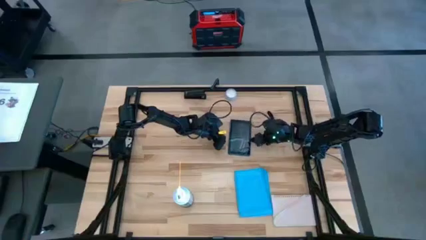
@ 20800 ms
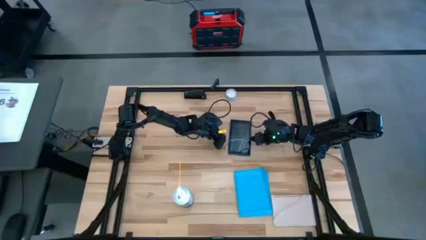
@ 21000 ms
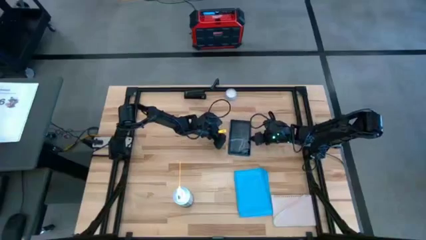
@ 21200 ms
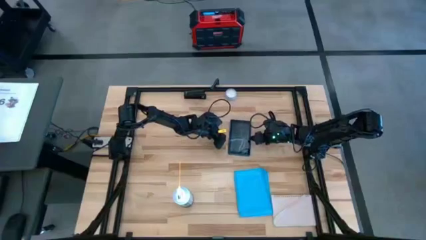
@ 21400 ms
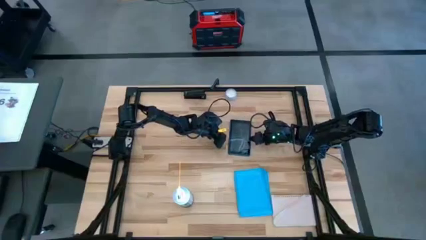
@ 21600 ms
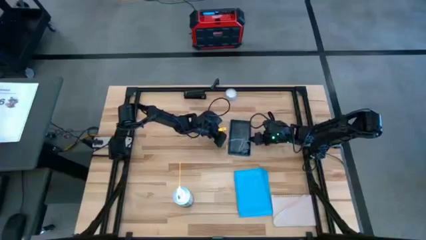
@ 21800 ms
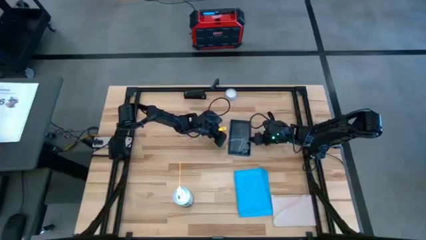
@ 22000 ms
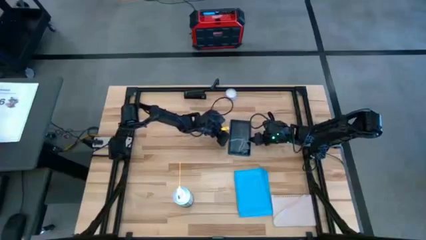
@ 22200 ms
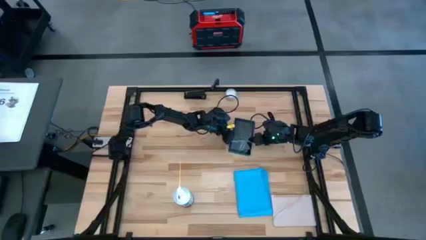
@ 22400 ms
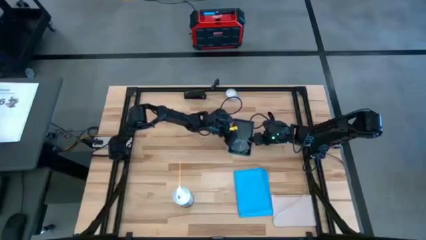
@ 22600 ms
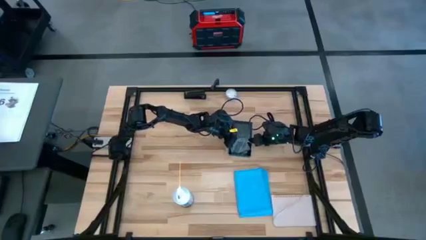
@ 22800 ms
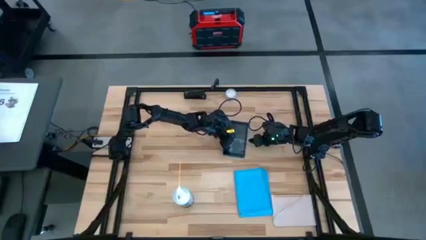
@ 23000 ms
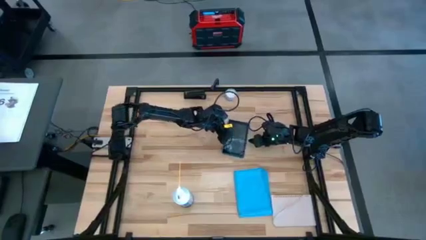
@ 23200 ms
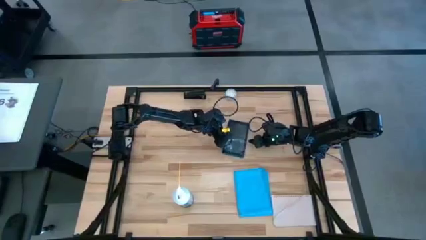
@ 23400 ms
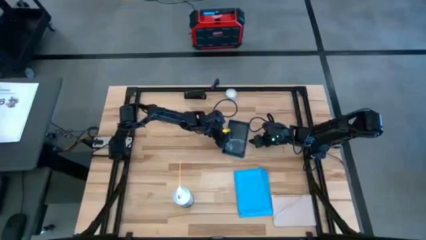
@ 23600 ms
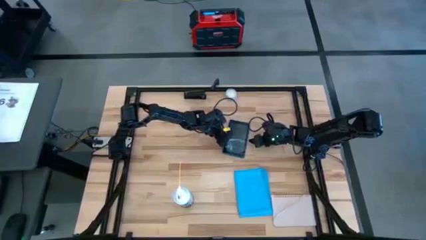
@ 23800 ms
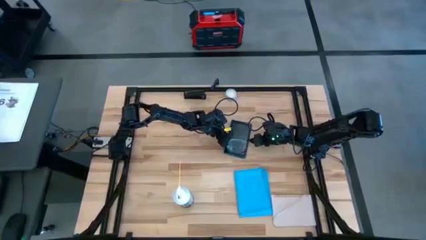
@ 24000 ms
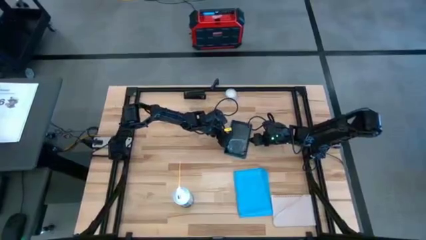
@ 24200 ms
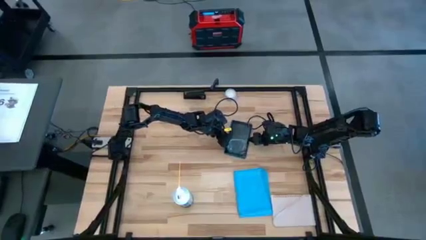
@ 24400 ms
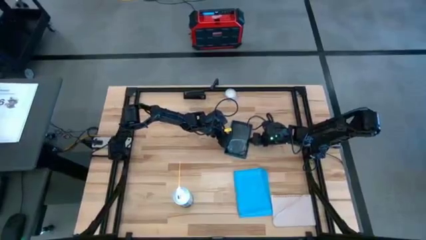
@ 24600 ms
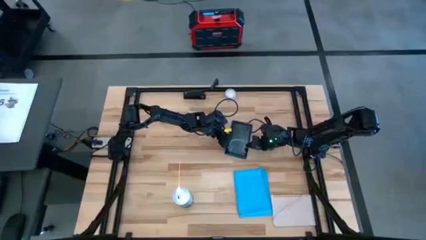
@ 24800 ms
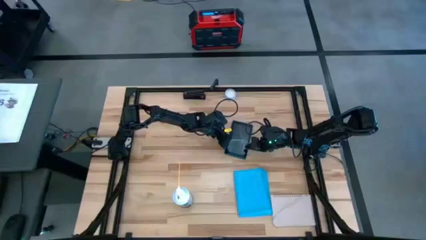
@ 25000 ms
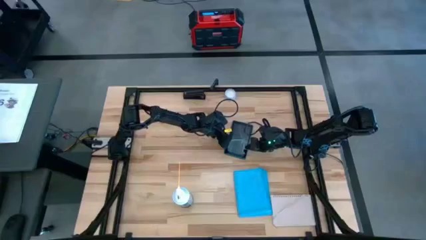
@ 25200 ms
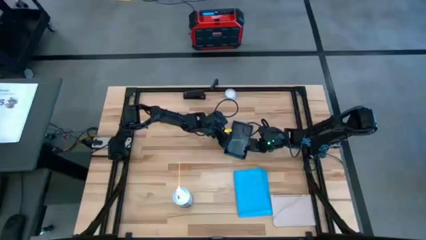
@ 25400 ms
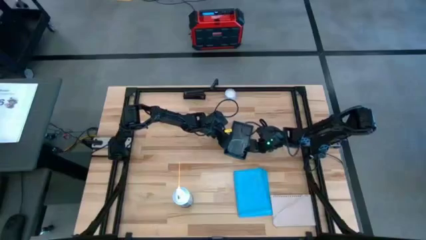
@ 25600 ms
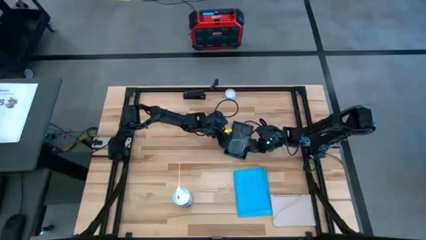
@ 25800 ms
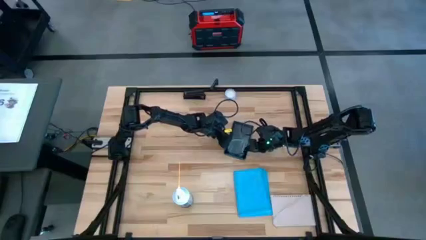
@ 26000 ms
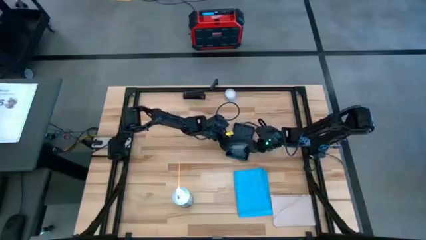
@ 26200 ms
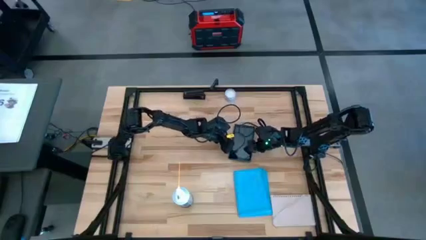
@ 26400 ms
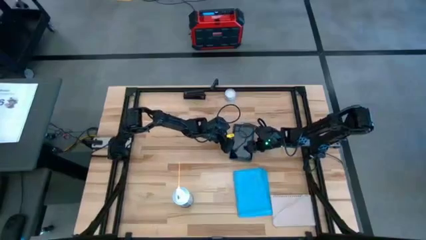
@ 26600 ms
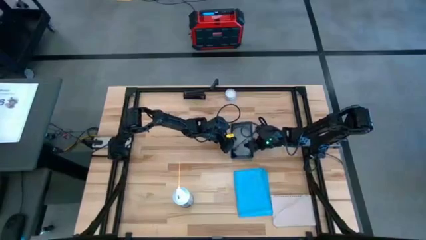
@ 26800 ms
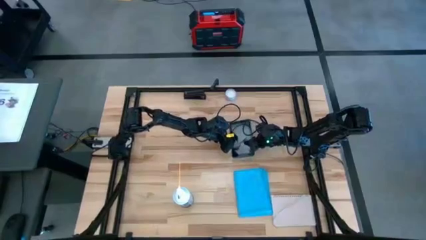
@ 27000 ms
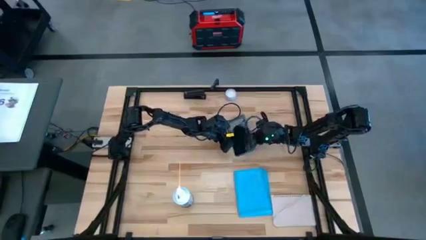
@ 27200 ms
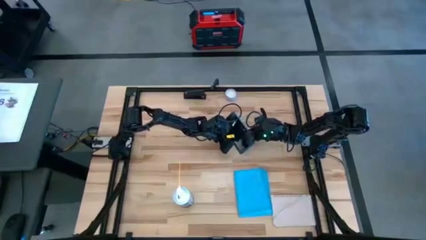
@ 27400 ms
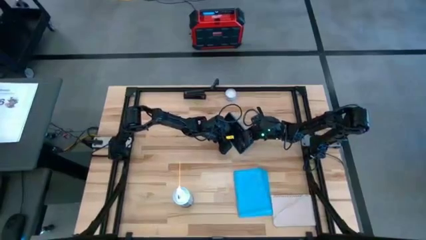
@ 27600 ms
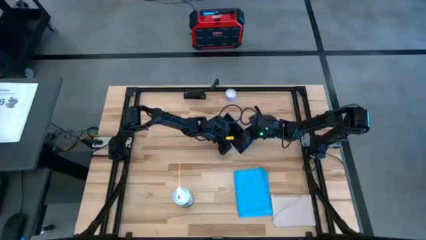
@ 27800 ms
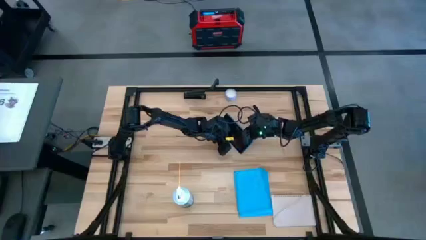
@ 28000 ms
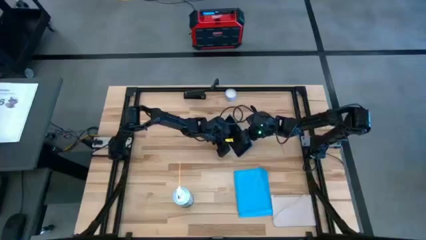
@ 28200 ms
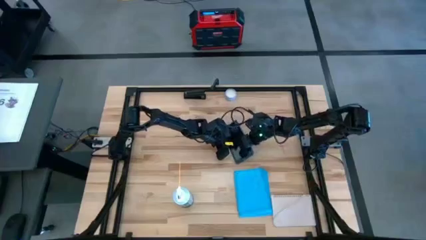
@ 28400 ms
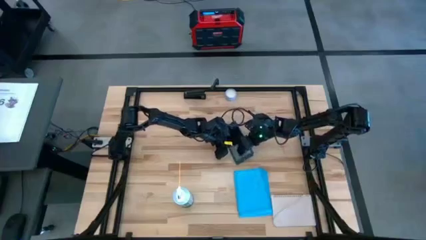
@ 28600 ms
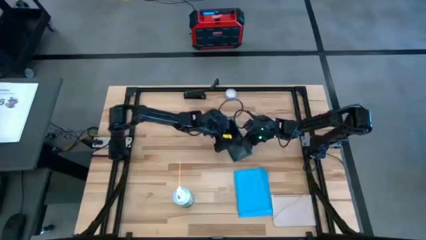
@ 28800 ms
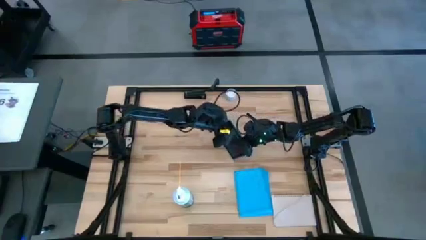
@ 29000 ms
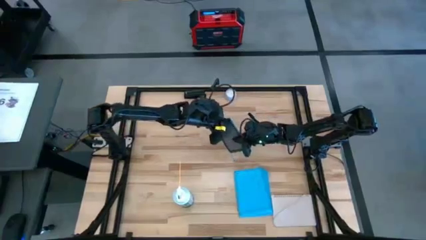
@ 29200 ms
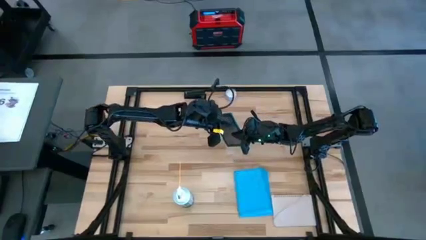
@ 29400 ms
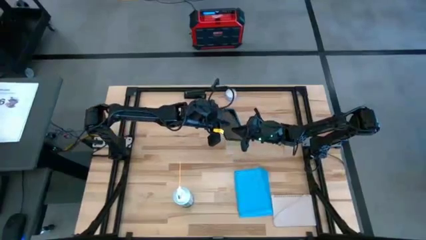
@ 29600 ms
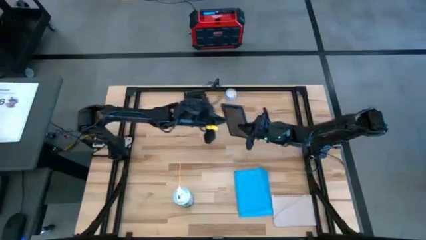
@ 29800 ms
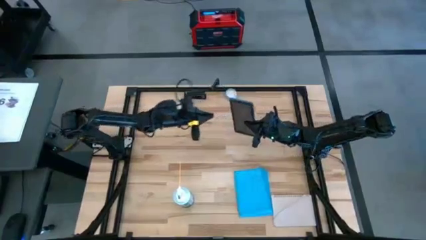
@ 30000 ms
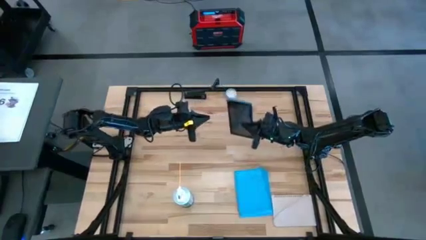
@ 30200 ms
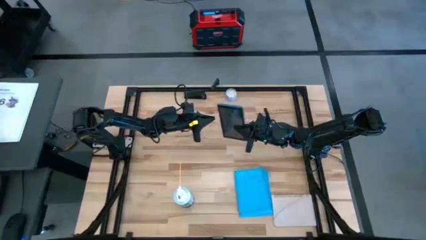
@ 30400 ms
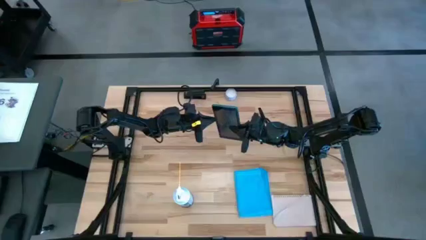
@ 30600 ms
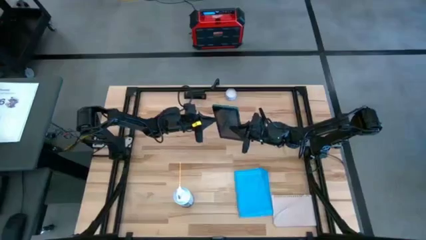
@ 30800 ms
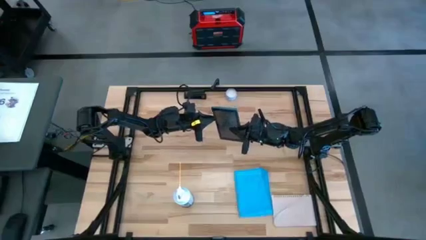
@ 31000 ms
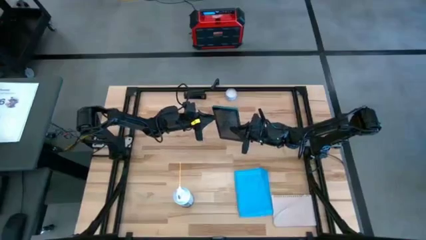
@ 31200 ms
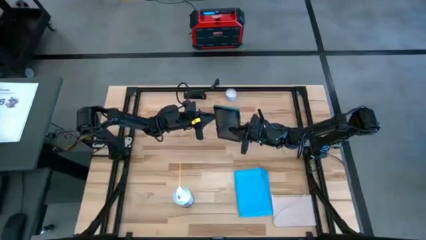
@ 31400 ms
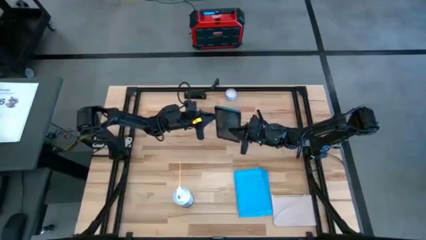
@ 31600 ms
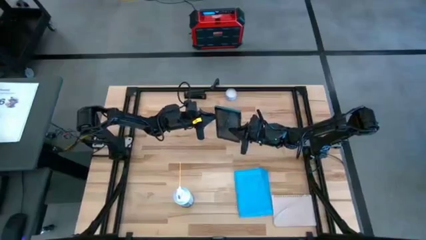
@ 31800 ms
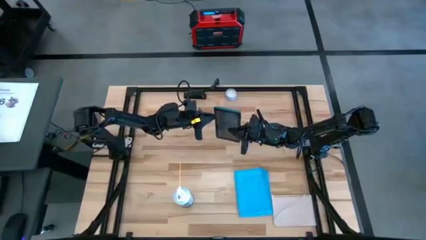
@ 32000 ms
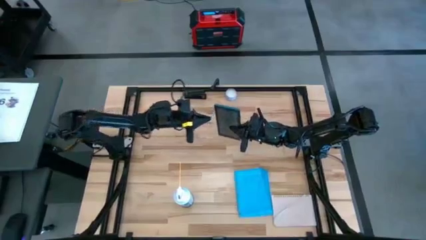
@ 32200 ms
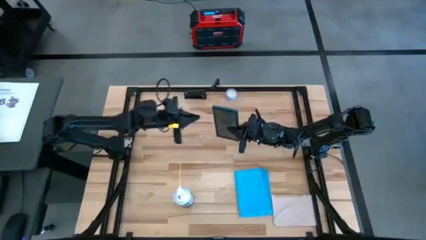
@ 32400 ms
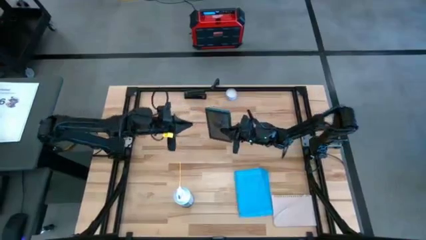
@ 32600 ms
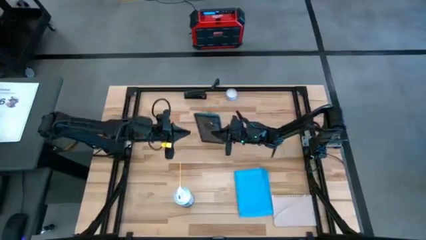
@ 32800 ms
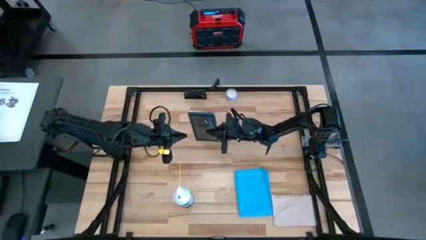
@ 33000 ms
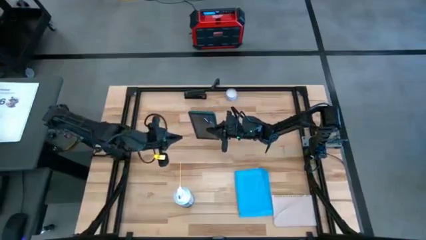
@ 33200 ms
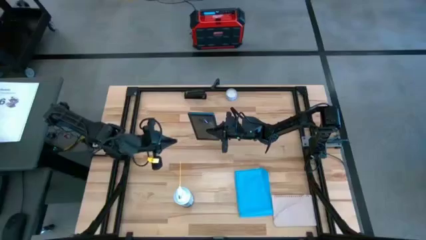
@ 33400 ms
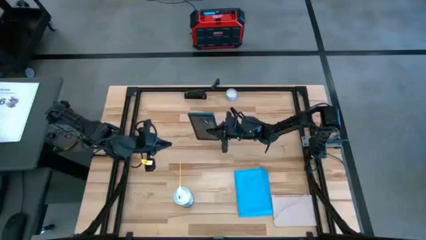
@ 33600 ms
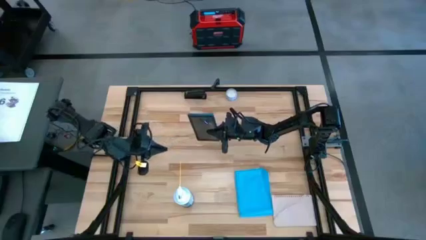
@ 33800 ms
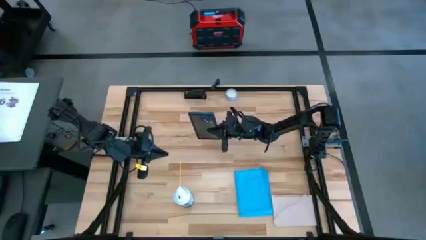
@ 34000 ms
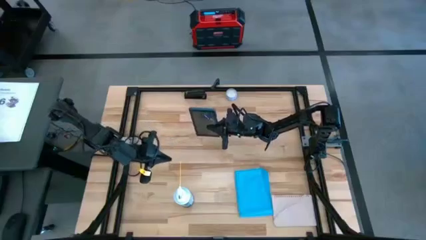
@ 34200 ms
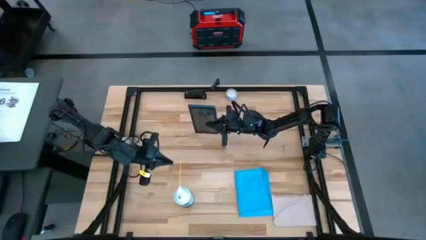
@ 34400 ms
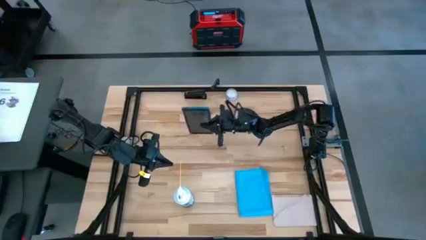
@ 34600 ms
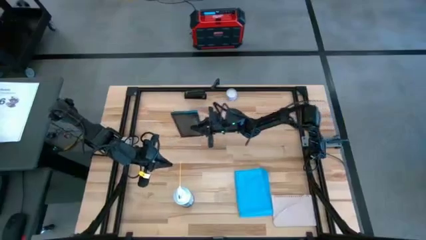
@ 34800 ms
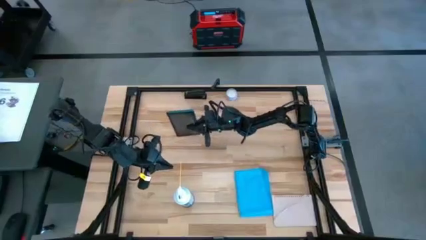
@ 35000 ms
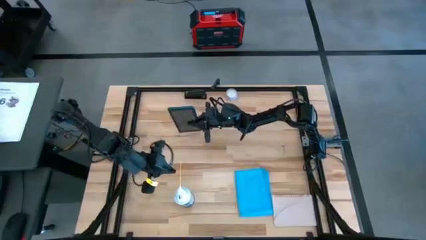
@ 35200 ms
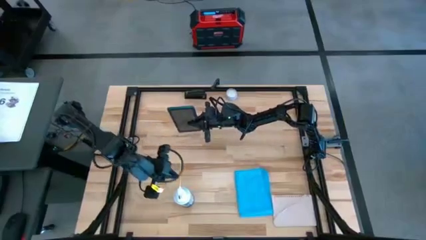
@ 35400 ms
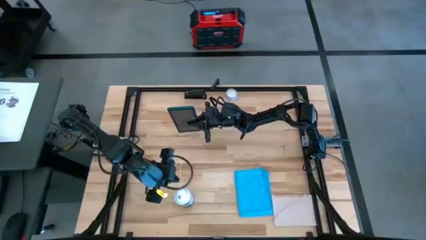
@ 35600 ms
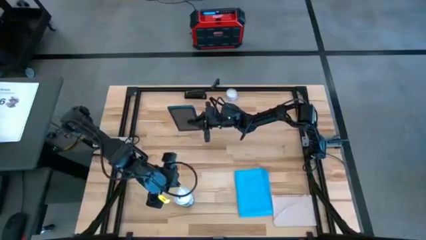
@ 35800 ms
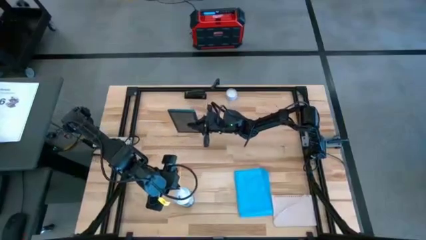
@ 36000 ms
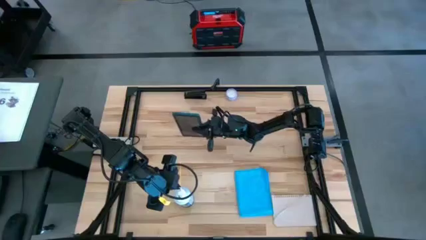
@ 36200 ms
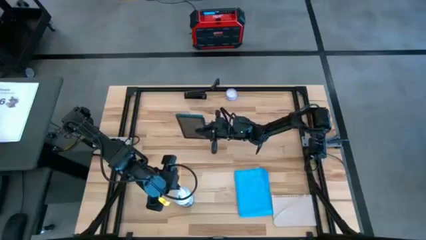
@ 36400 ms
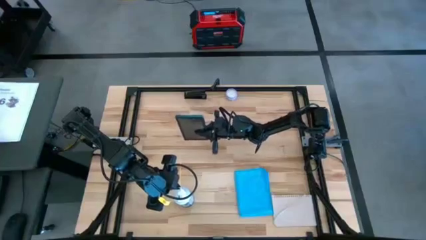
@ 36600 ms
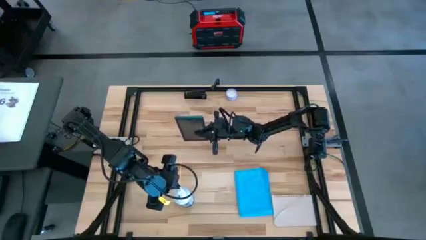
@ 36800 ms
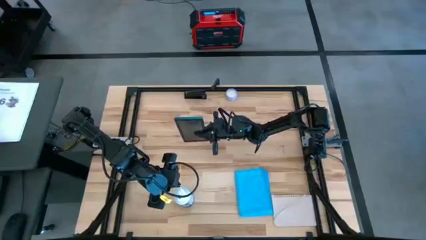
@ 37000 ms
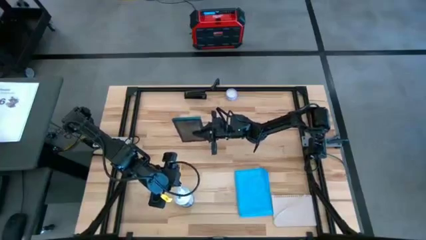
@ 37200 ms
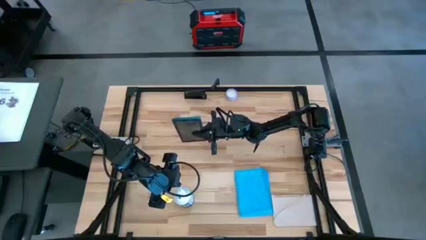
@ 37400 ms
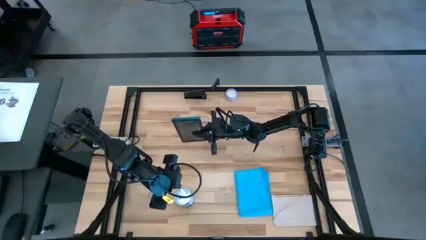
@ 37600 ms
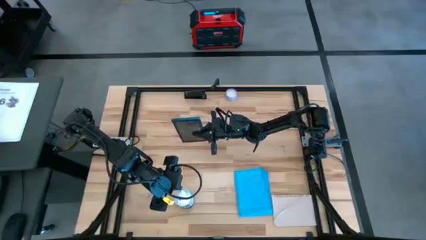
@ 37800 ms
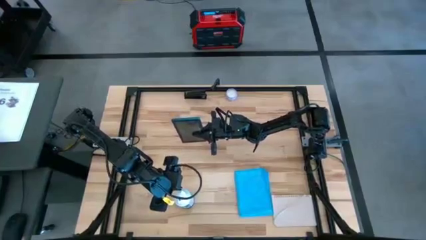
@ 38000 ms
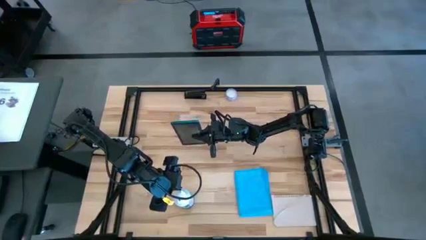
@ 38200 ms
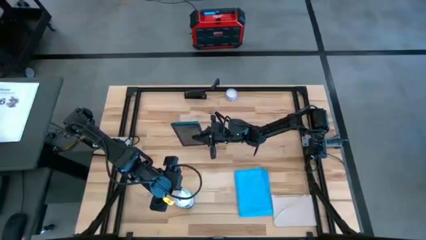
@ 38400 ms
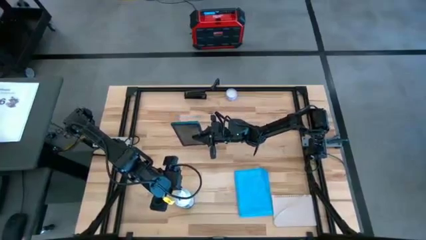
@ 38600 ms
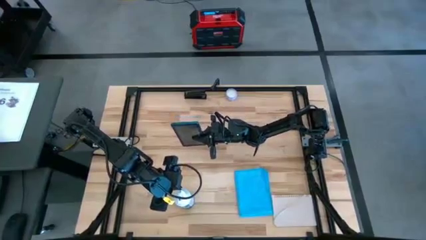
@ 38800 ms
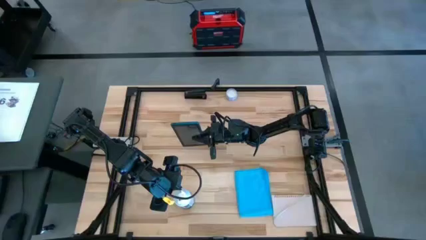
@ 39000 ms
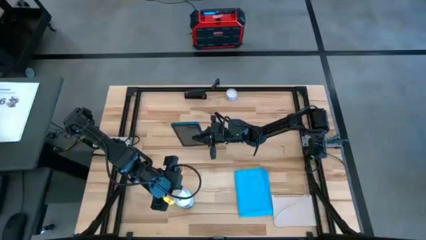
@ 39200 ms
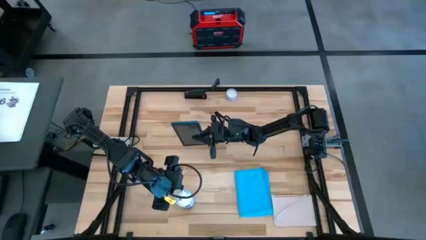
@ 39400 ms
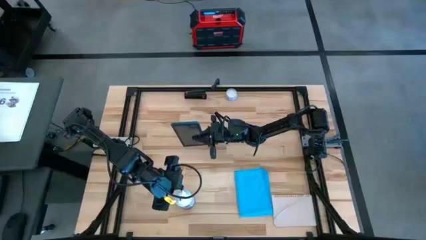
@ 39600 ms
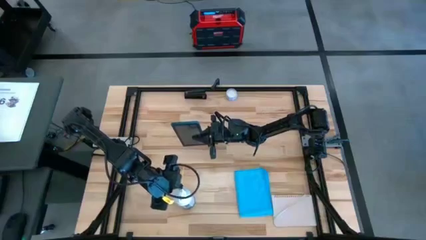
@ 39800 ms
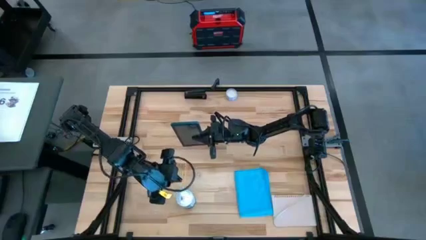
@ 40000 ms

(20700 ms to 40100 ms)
Task: Apply microfiber cloth
Spray the front of the black tablet using the spray can
